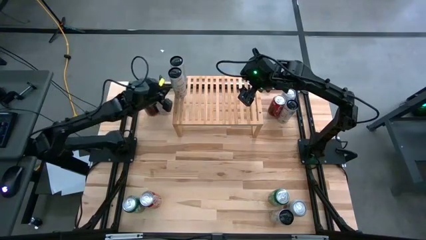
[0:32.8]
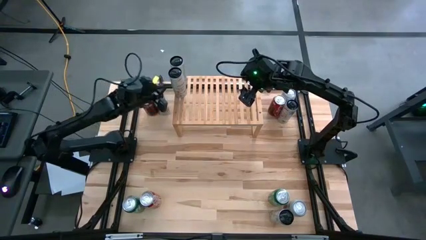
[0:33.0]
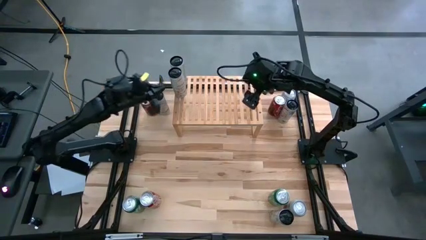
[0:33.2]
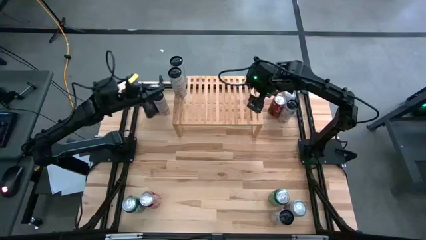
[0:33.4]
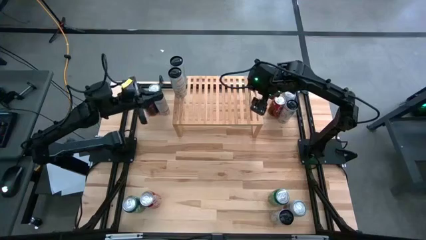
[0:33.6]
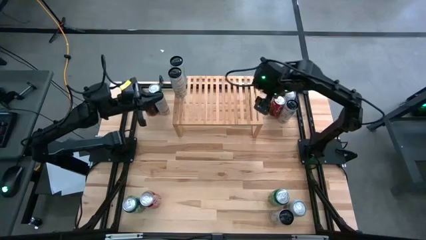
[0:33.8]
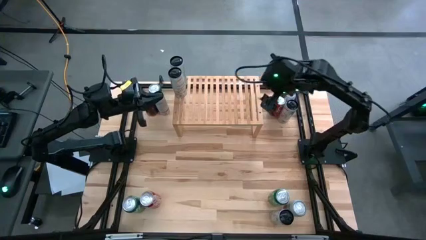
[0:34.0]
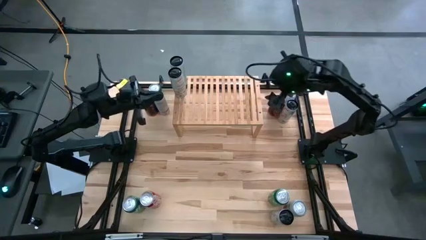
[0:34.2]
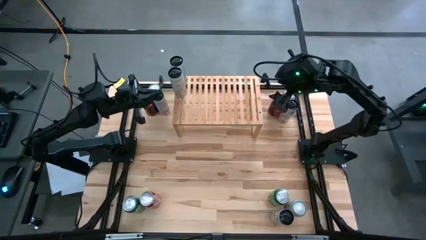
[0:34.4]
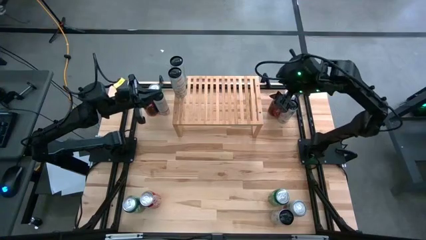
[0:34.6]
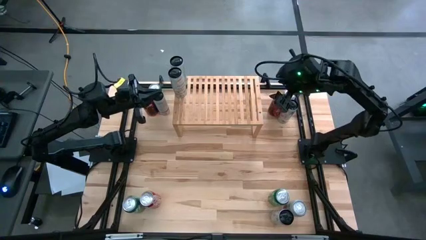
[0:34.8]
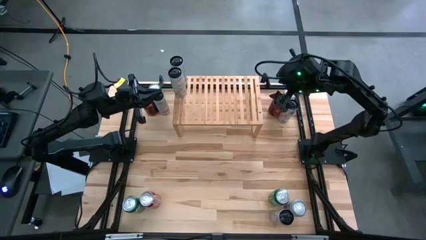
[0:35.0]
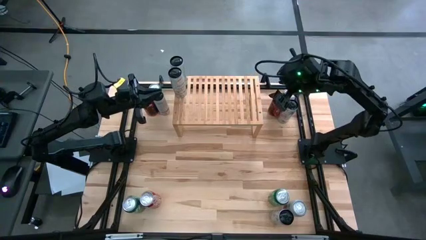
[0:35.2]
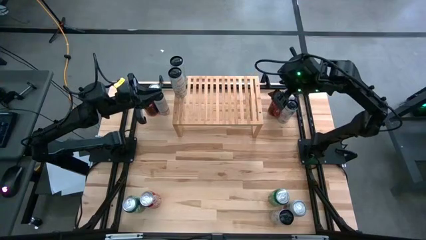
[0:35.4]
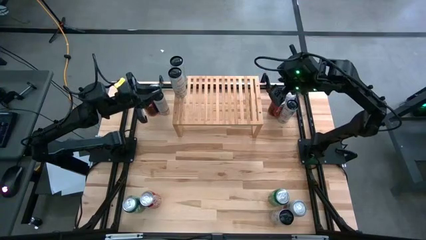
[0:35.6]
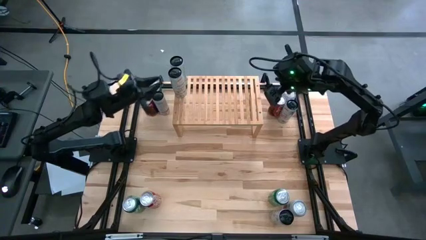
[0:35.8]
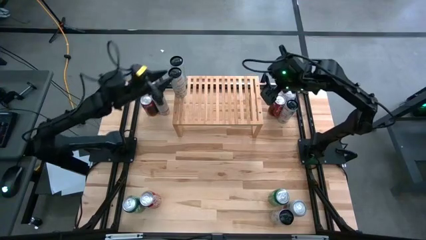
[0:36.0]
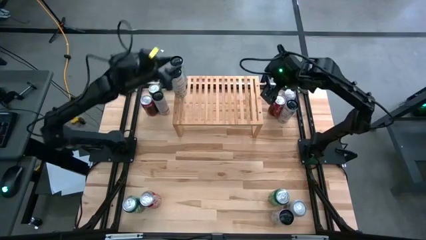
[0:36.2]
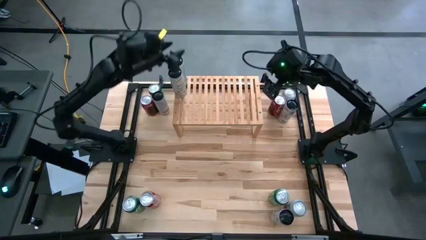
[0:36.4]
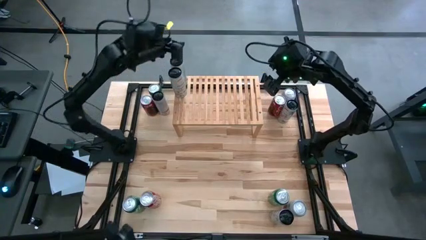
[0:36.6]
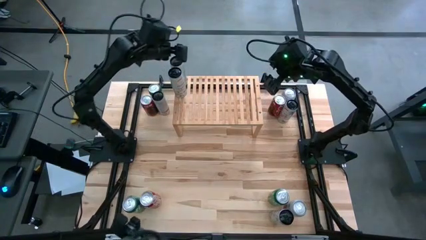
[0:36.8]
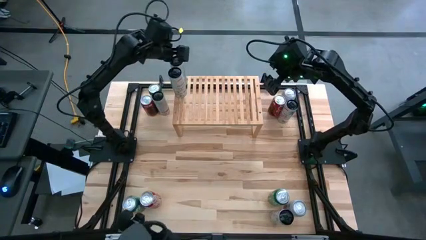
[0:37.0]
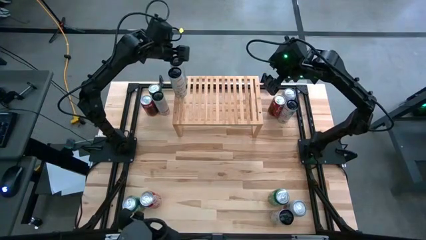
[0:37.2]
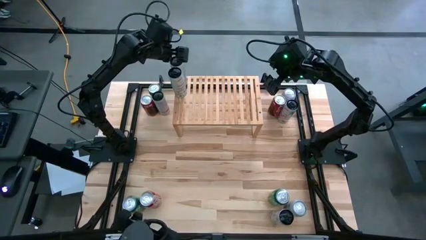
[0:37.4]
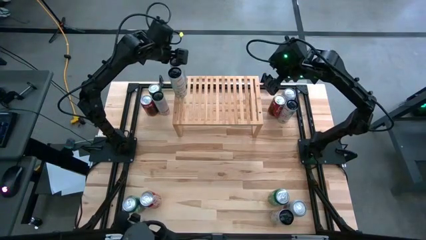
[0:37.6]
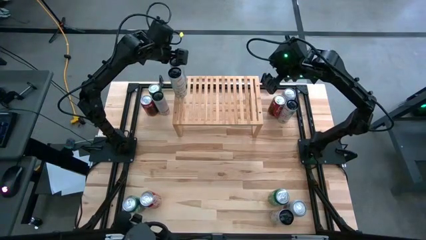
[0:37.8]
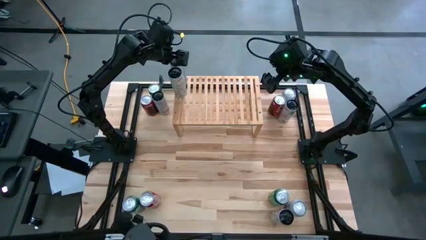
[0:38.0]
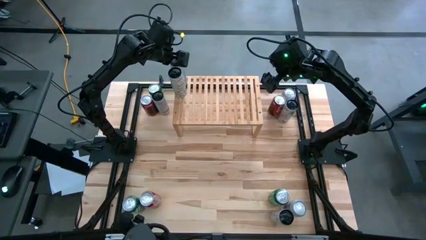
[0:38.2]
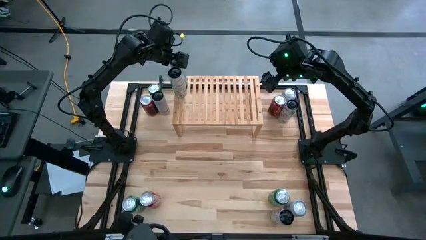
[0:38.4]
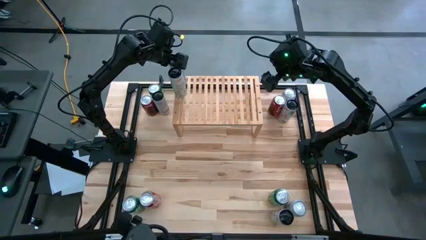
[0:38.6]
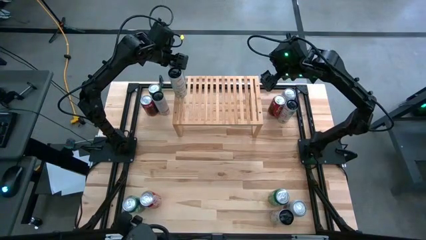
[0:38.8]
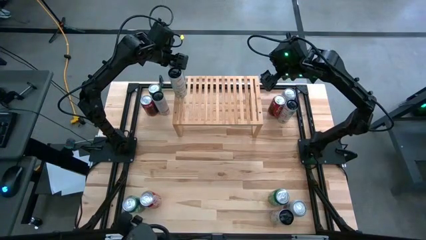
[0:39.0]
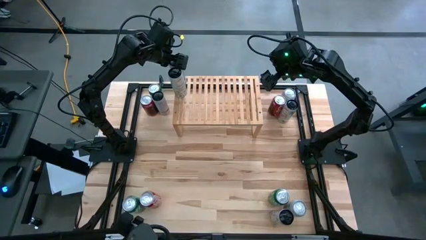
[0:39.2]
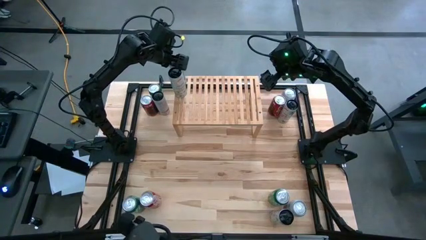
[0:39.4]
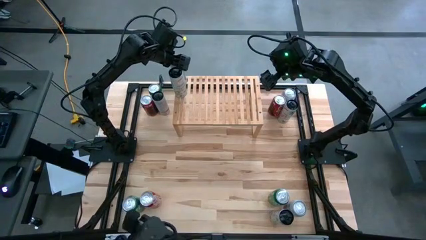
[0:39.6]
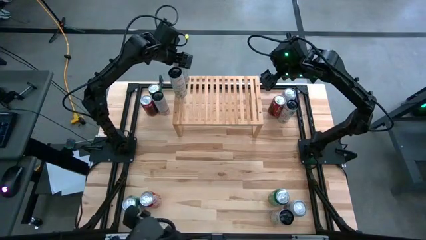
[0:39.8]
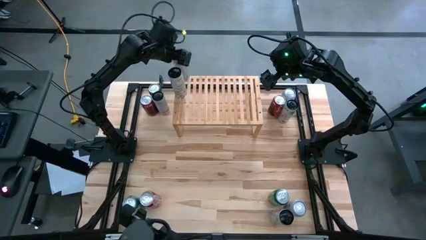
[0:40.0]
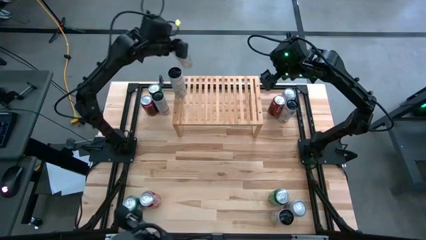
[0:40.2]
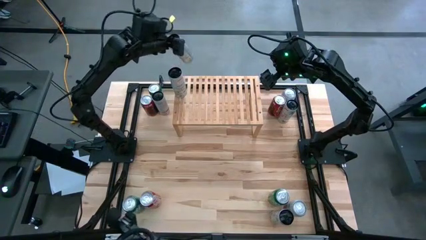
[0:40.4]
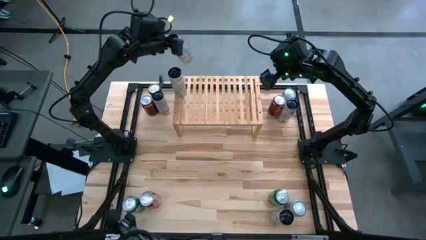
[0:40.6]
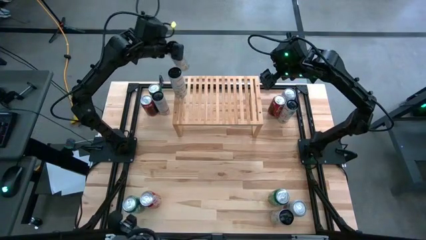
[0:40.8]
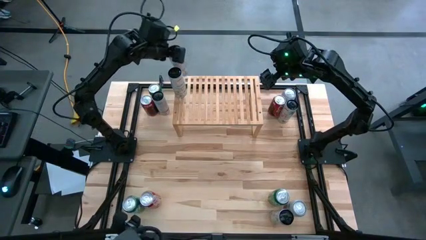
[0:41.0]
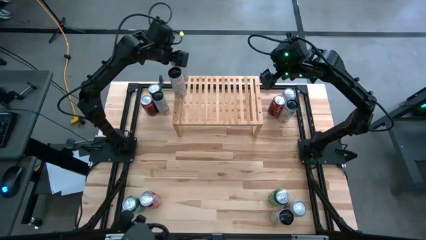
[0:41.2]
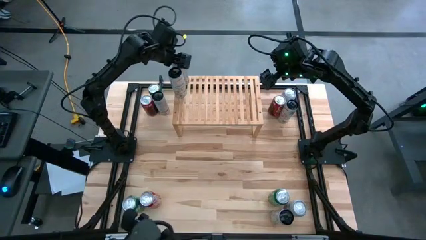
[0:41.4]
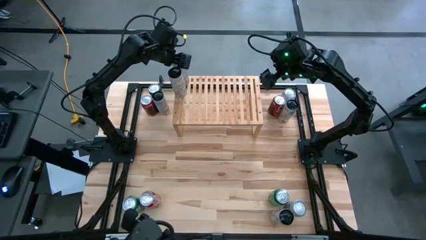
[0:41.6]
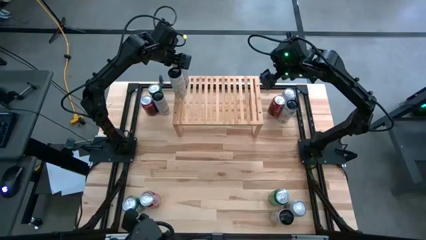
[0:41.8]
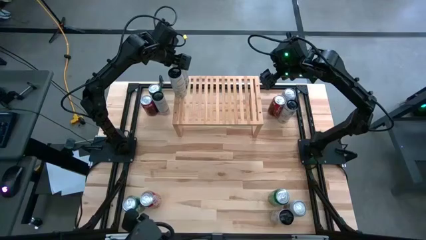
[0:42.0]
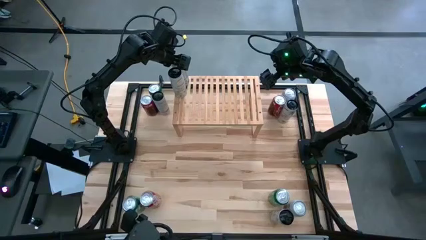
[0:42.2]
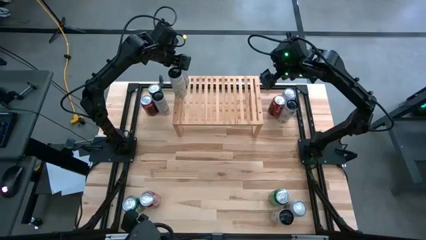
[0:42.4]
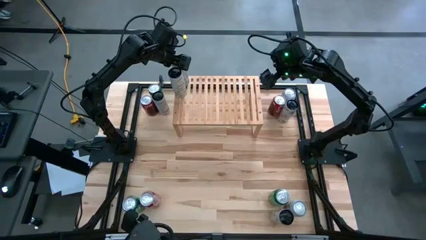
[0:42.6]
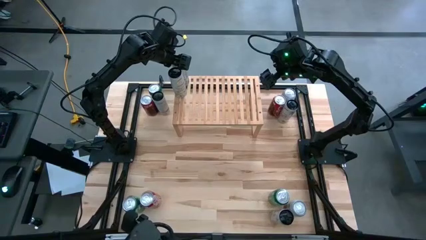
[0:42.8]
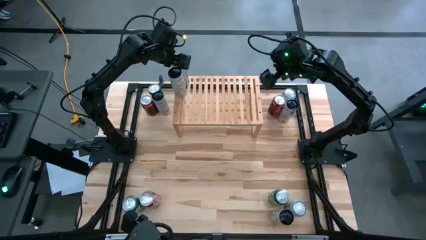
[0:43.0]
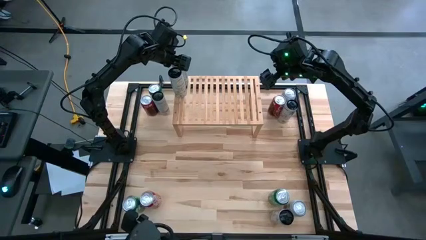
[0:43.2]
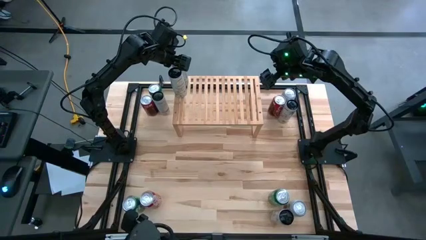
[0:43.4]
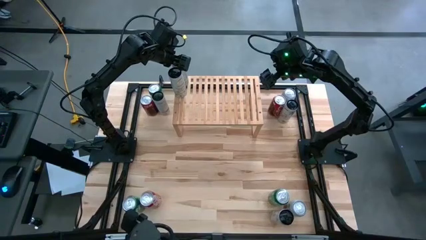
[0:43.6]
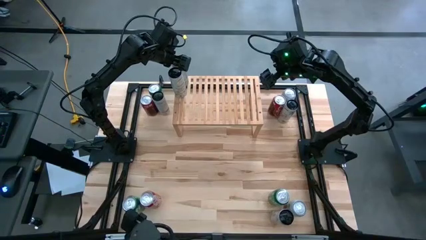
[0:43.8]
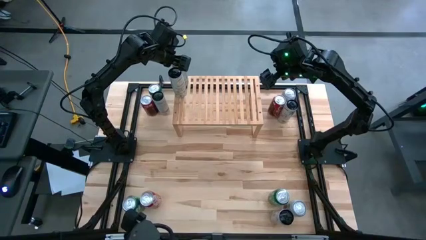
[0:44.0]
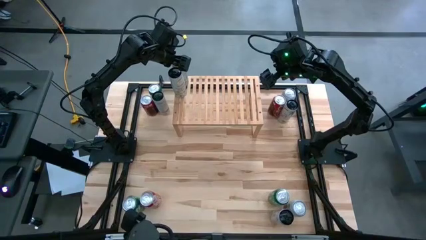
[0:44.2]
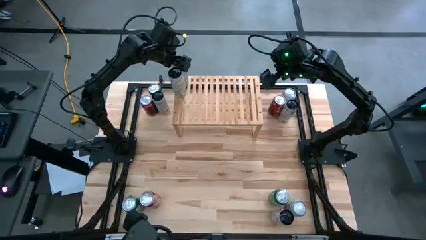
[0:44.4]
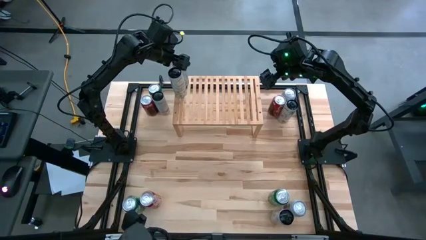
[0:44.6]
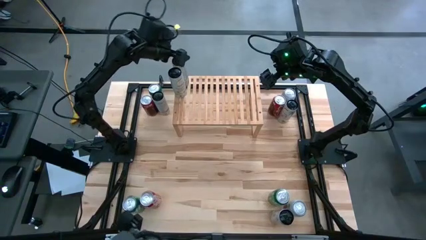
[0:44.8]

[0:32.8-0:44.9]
Task: Place canned beverage on shelf
Adjust the white yellow soda can on the shelf
